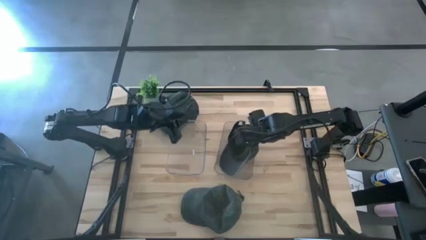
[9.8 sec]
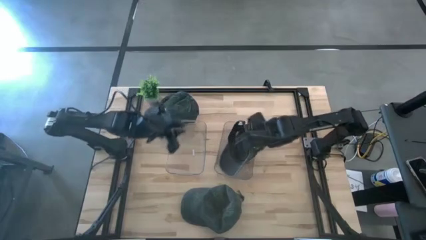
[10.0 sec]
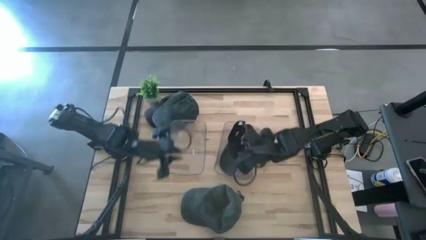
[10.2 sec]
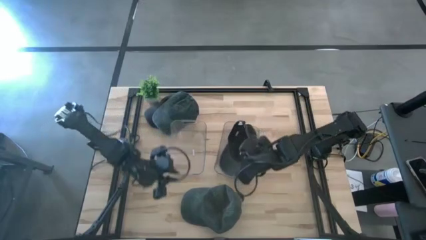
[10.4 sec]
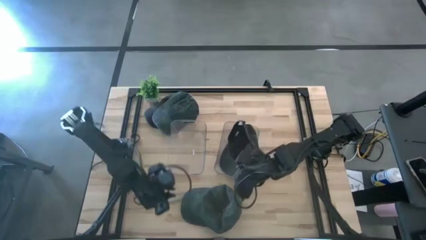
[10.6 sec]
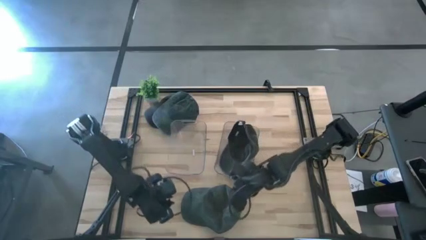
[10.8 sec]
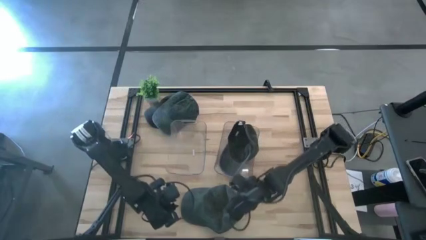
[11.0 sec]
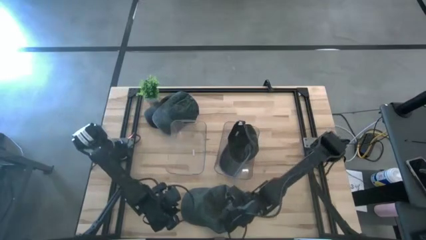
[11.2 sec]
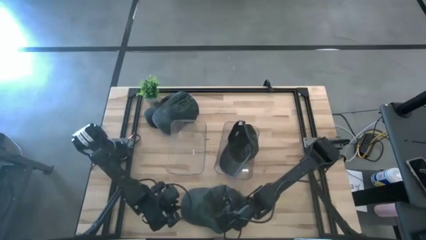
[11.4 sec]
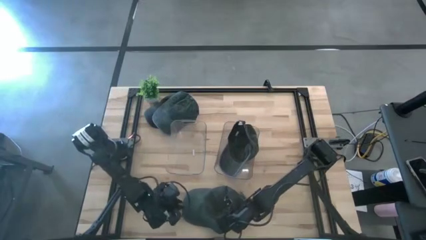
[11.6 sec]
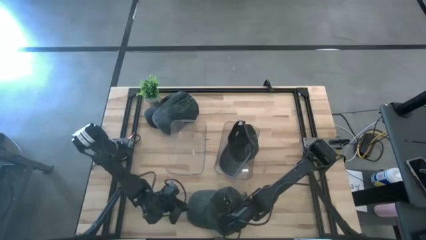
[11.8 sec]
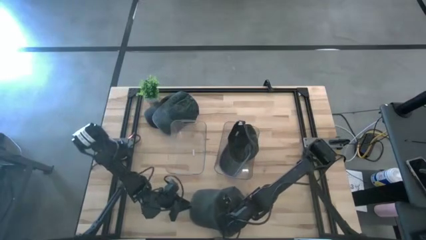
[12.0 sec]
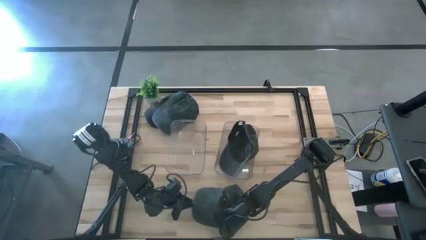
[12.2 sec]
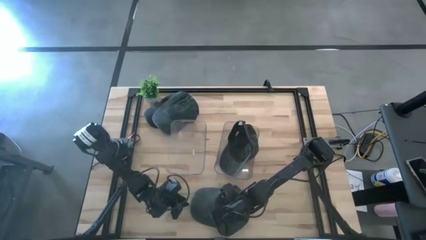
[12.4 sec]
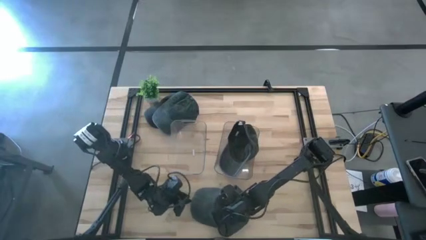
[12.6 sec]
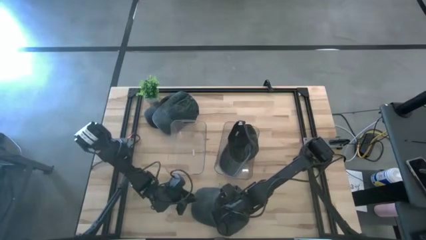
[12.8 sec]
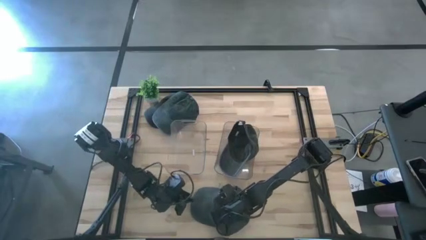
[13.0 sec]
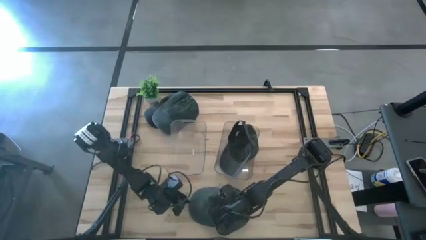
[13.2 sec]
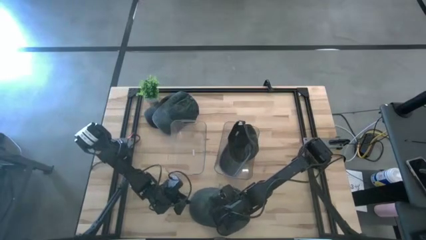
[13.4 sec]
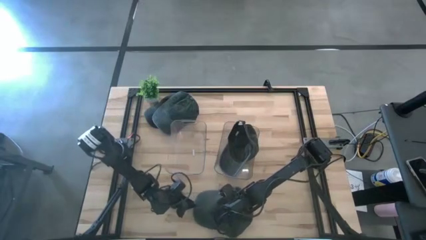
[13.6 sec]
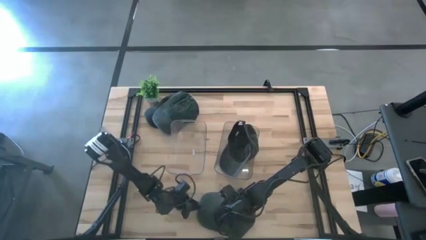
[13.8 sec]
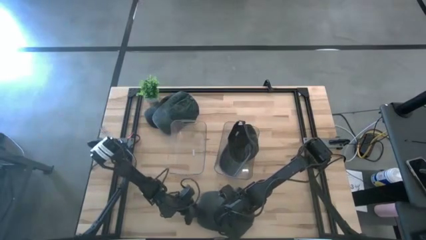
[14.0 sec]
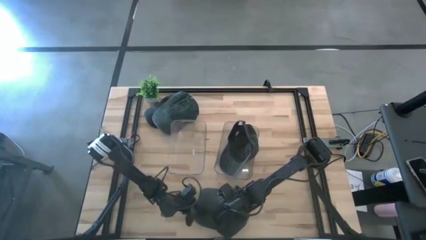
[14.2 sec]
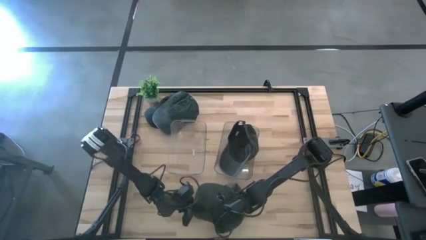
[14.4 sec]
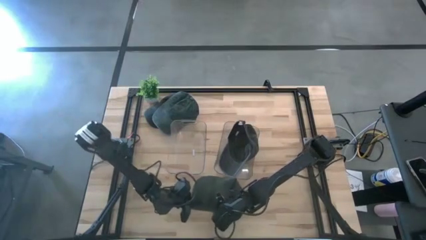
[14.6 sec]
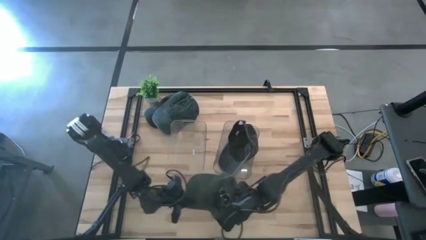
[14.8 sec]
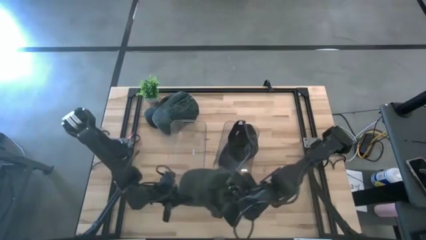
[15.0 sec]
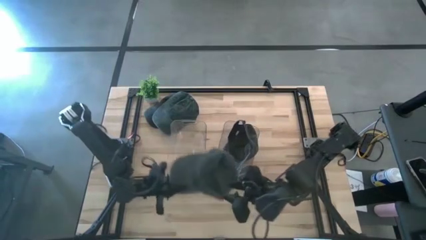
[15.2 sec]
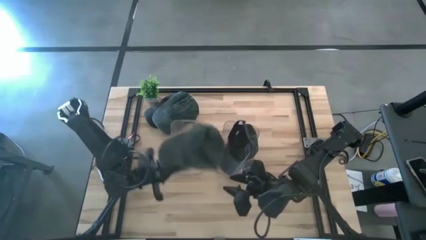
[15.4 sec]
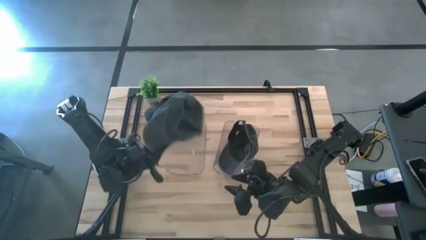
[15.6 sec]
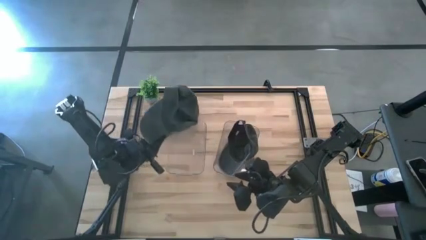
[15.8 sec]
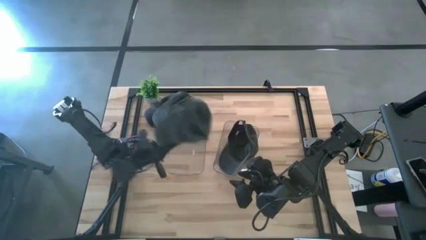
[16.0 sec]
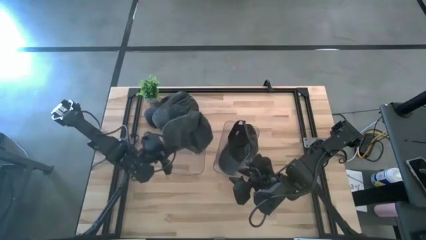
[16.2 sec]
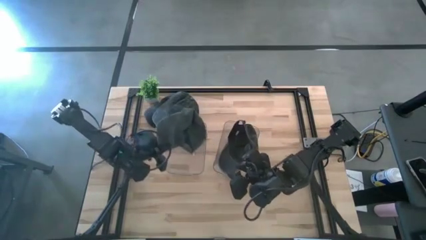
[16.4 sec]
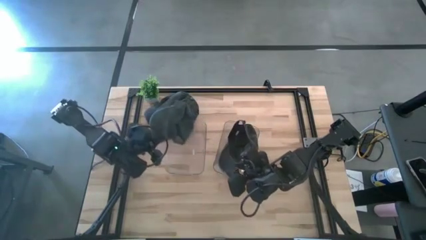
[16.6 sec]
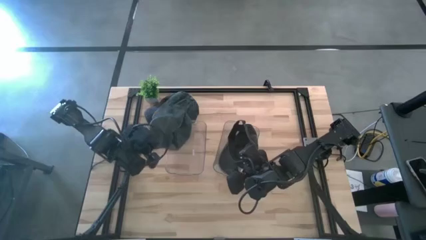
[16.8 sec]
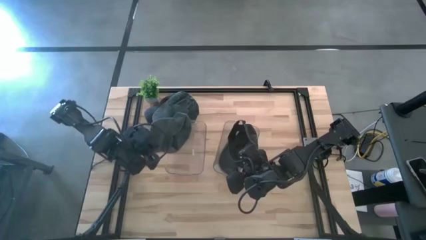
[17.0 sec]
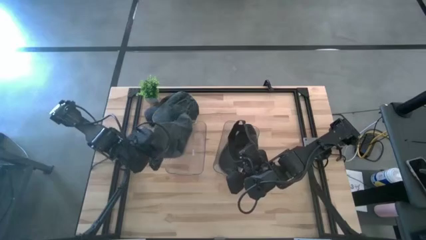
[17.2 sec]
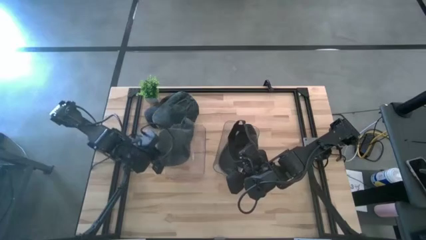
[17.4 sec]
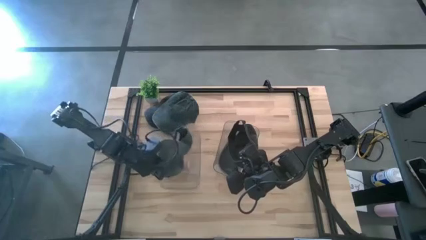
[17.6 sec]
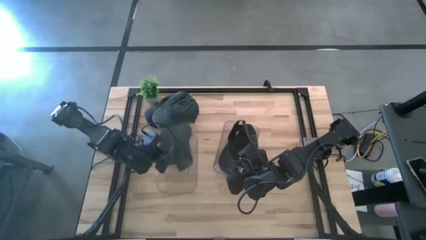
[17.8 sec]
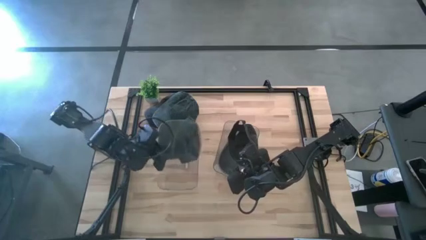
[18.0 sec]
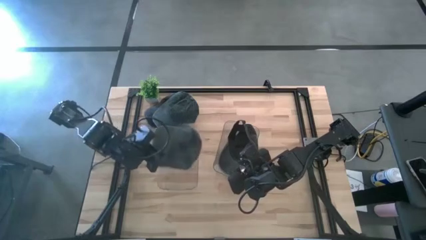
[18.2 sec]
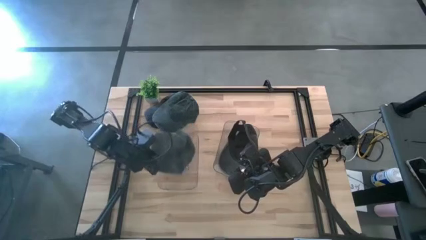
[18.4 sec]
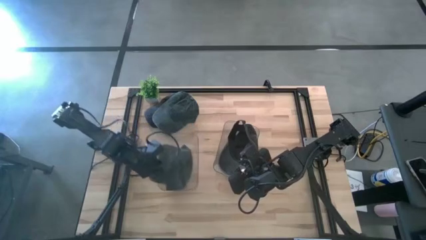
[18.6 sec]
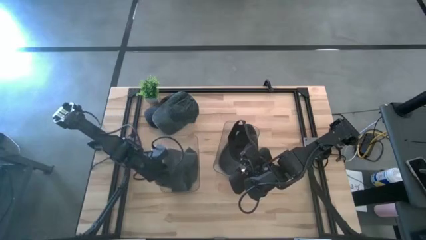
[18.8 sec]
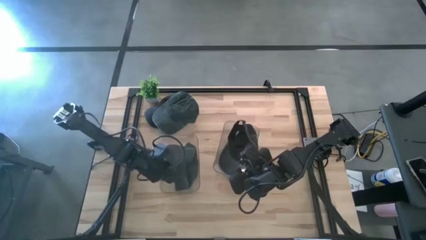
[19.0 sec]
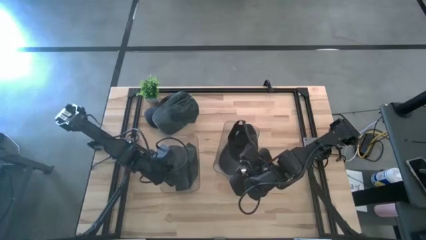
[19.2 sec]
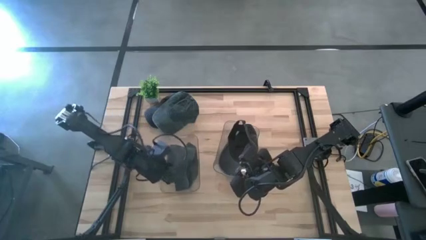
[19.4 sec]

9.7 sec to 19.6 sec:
Task: Pick & Place hat
Put the bottom gray cap into the left transparent bin

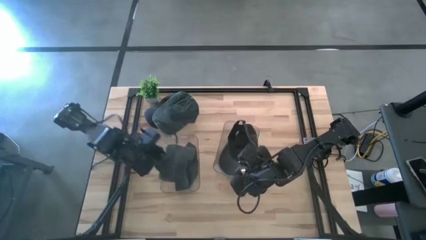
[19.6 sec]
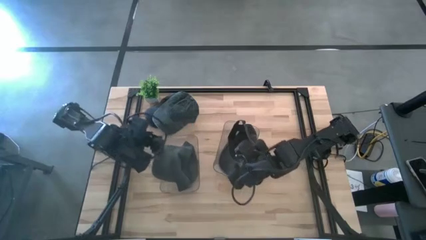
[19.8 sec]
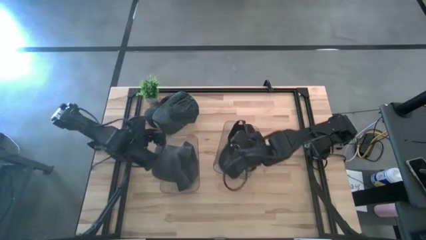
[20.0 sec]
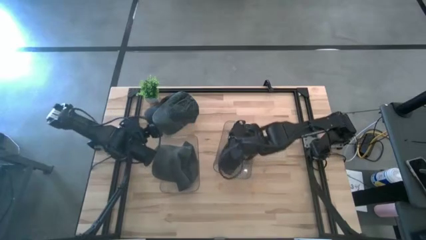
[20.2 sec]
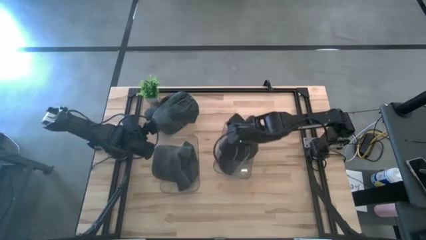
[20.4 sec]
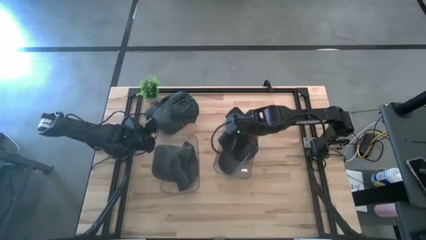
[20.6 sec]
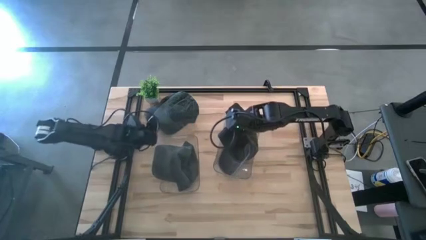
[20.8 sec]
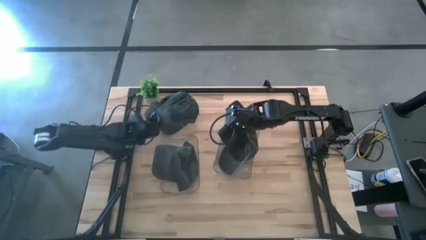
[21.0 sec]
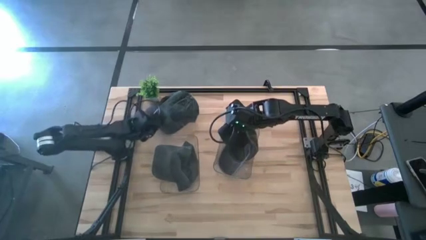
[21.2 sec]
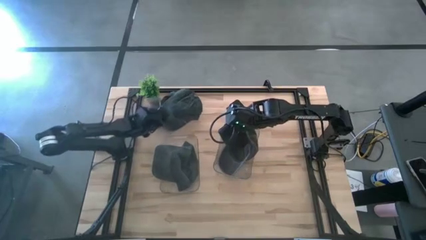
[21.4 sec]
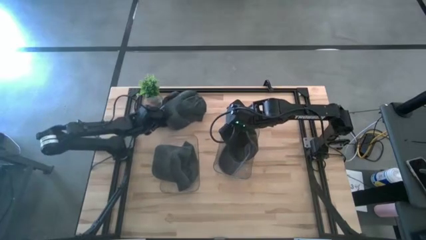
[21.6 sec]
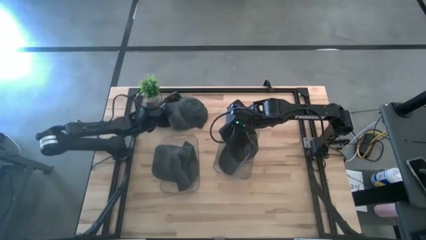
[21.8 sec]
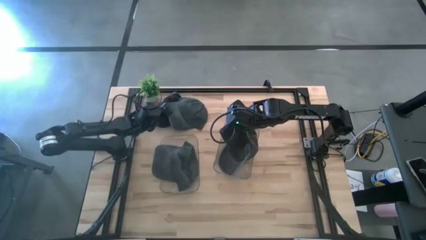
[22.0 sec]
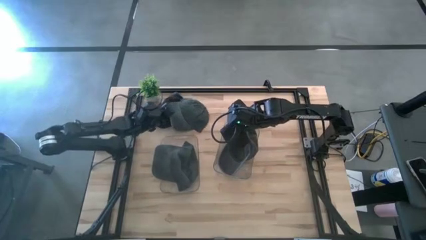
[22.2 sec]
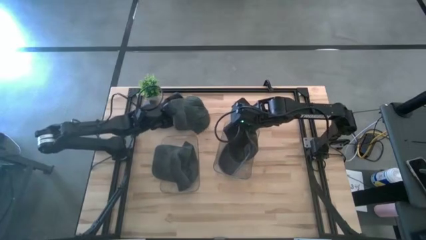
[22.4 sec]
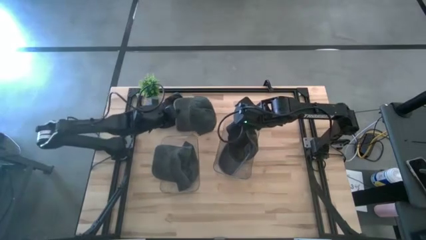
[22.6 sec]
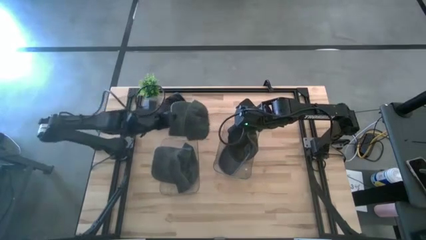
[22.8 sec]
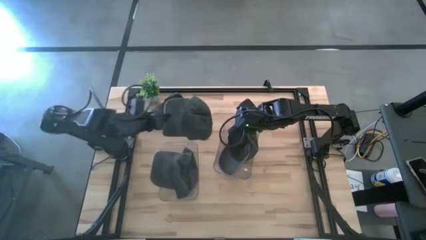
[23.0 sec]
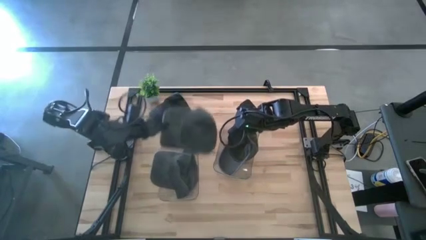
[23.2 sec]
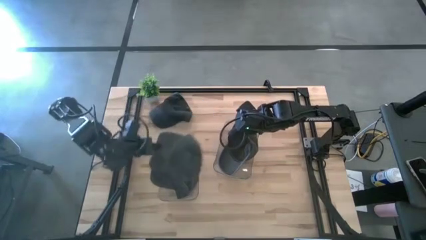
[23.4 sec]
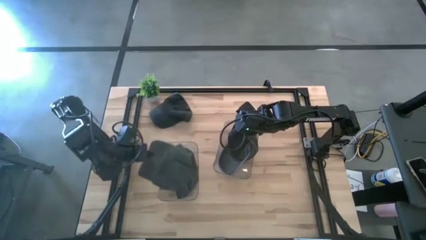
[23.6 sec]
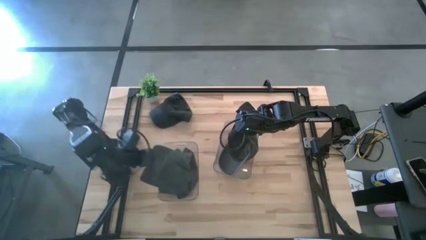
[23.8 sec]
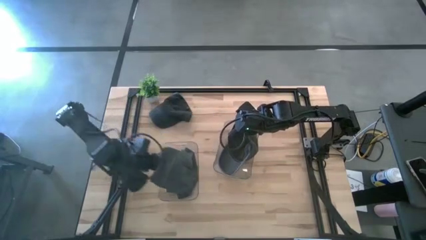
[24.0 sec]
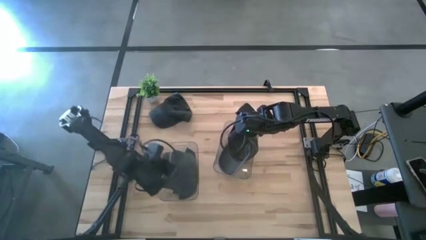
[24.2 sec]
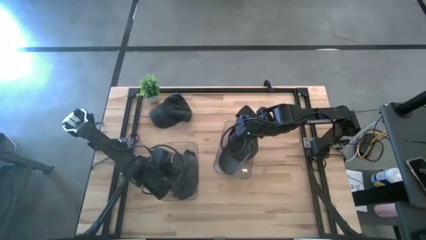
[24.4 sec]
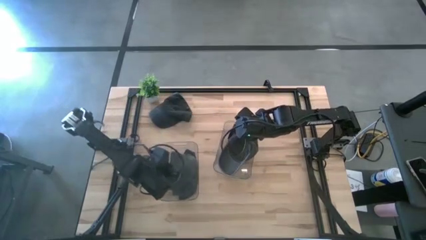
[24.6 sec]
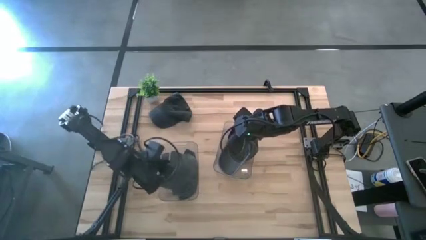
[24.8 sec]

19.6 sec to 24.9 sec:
Put the gray cap into the left transparent bin
